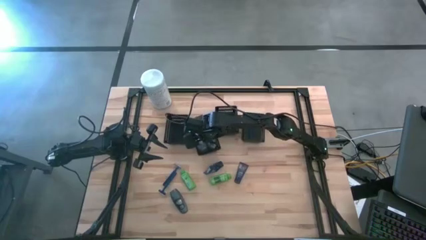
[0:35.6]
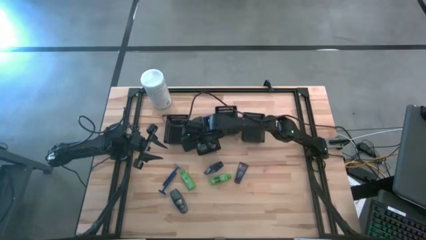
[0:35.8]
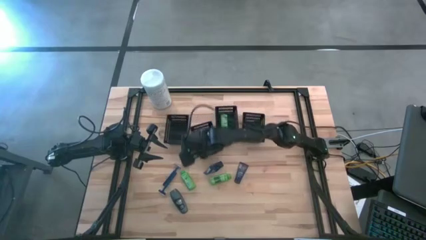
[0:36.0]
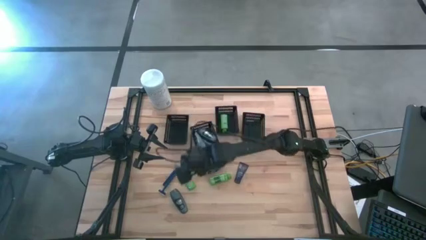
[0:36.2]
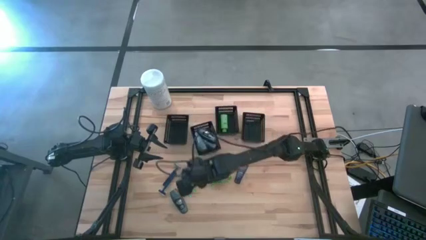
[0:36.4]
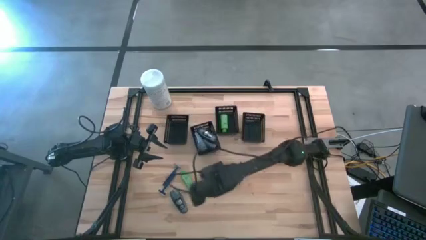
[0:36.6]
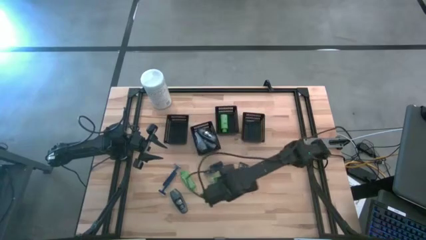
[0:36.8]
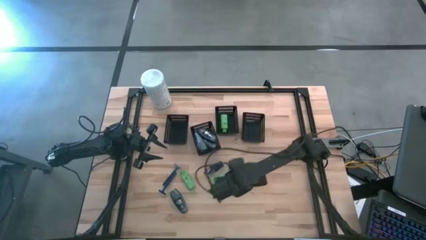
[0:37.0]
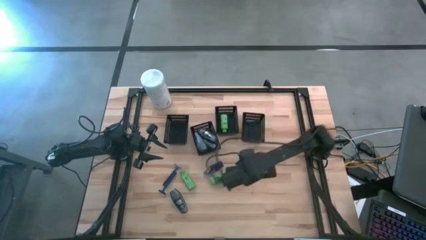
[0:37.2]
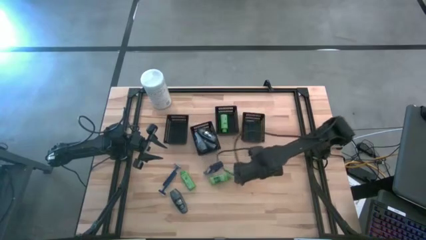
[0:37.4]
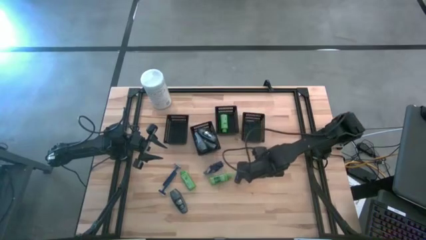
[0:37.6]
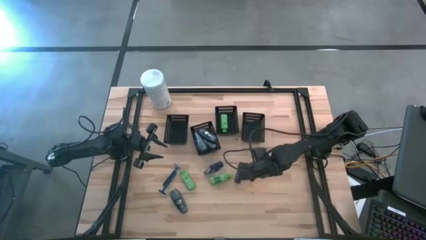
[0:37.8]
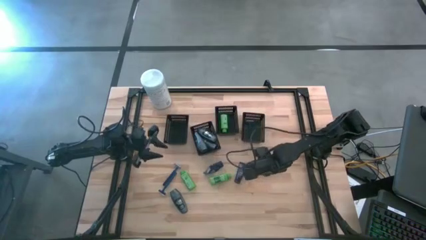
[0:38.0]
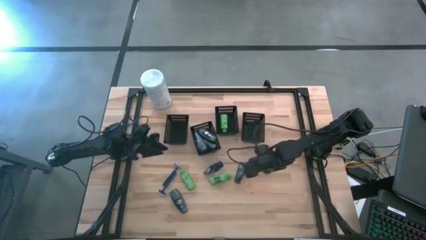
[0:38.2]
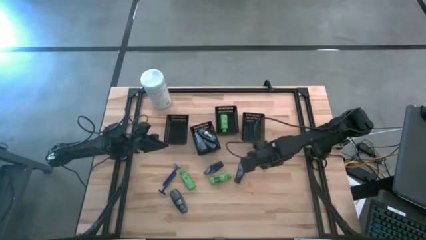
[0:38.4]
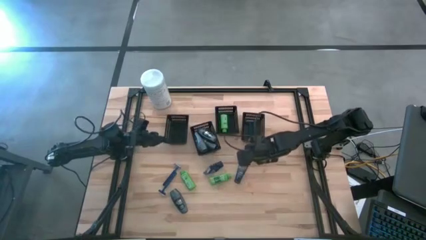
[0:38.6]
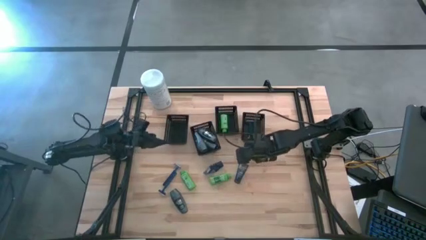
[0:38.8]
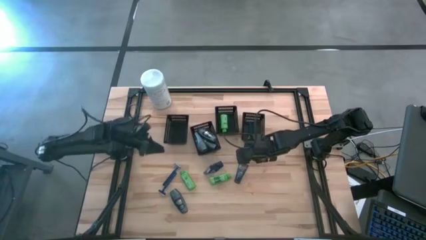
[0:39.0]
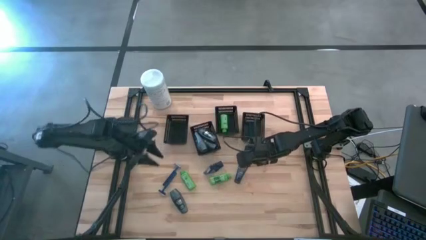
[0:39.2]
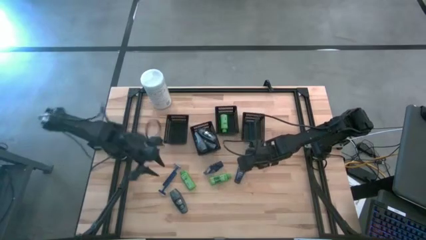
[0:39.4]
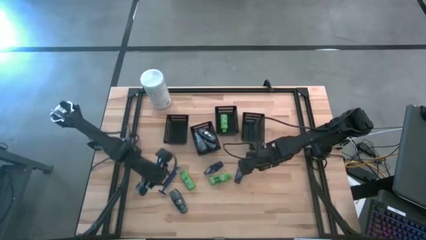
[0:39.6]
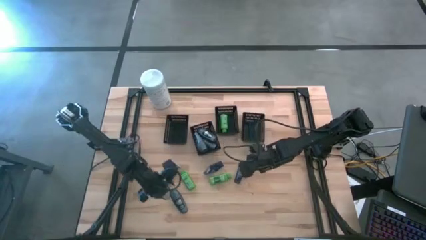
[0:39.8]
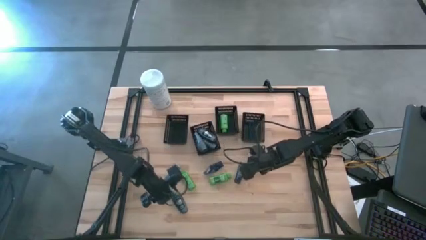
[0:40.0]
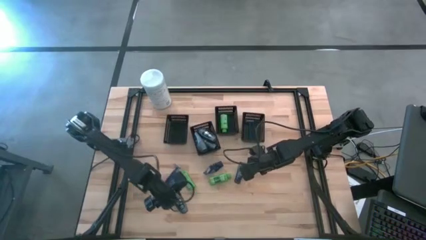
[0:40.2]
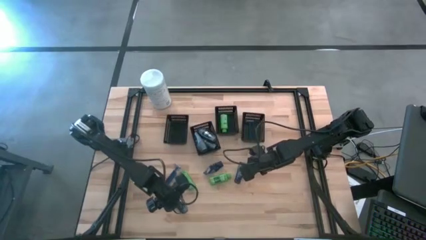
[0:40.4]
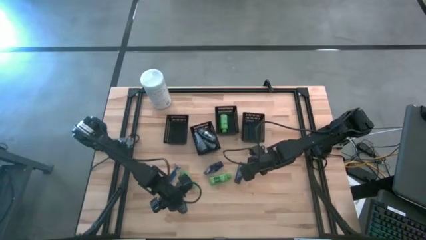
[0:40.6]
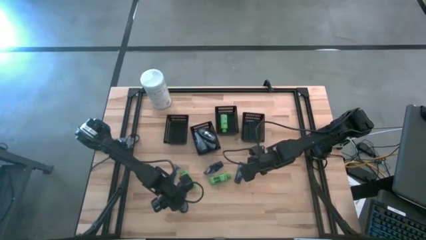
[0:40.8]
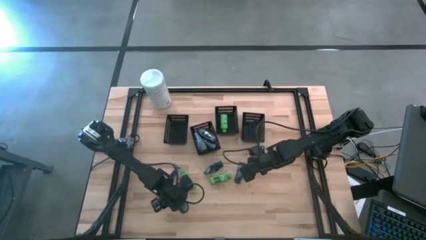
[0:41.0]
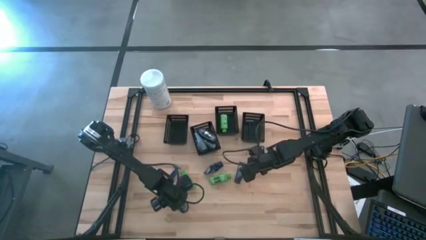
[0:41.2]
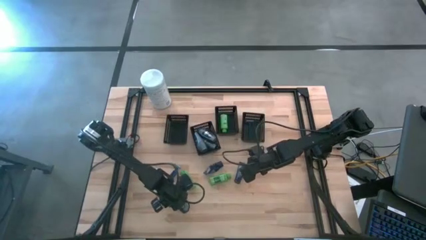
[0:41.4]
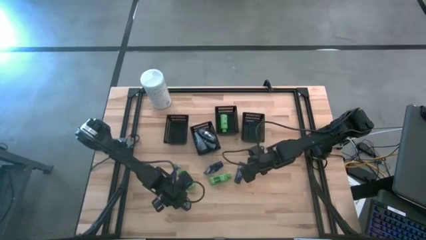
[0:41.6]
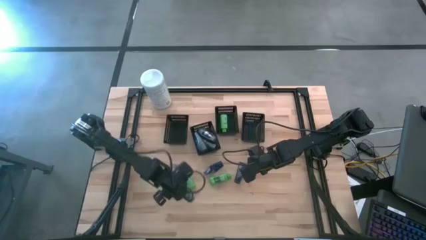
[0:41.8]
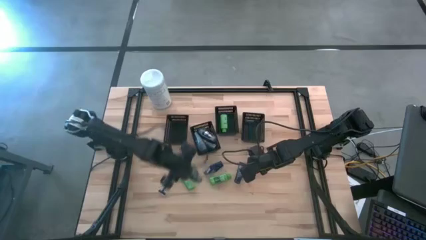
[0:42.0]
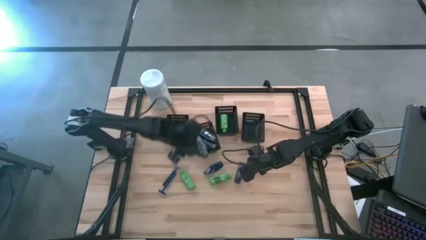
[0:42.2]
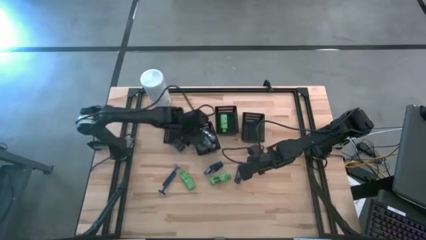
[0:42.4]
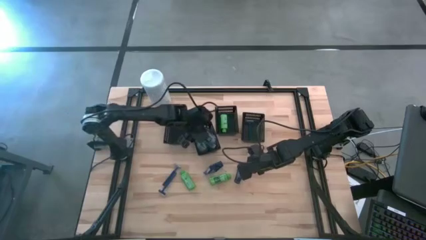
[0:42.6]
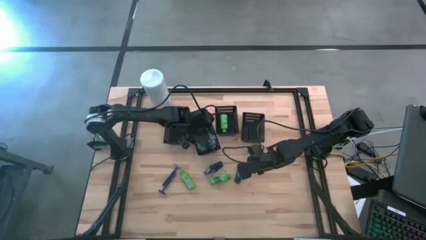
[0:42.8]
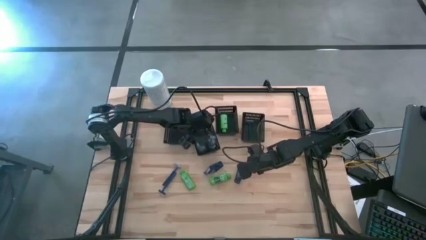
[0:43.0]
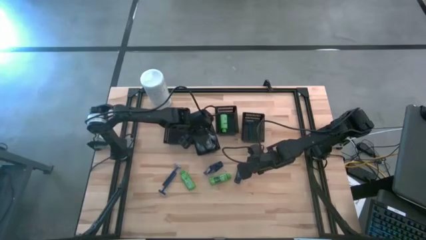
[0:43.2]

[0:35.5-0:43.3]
Task: Pick & Place Travel size toiletries
Put the deodorant into the middle left bin

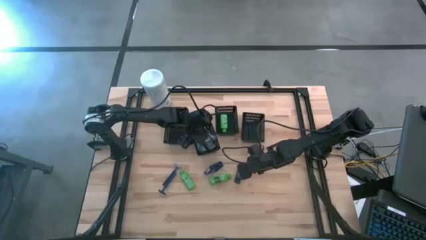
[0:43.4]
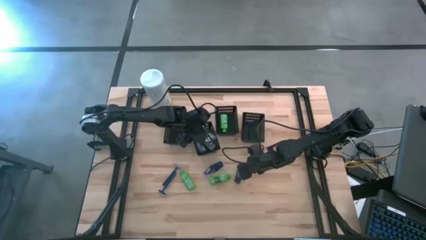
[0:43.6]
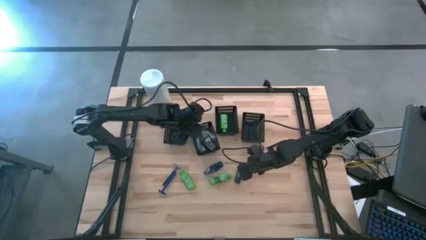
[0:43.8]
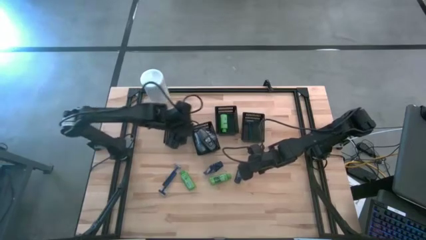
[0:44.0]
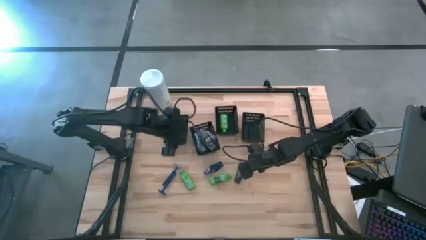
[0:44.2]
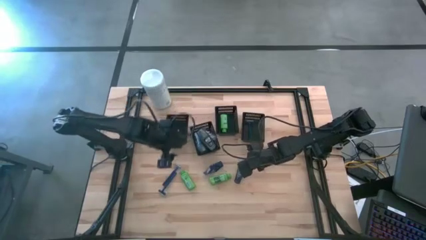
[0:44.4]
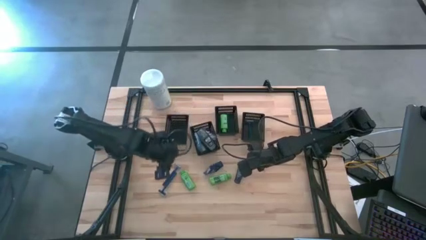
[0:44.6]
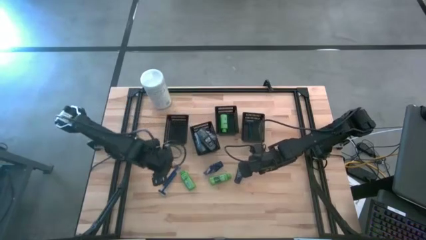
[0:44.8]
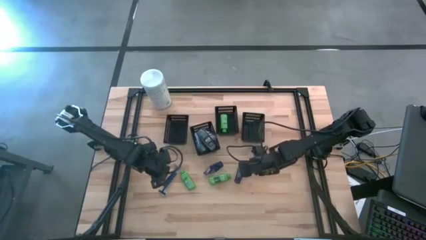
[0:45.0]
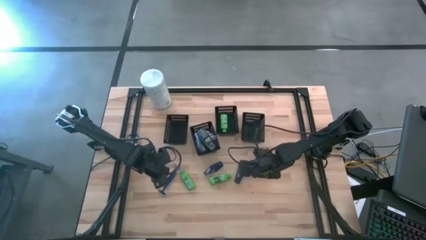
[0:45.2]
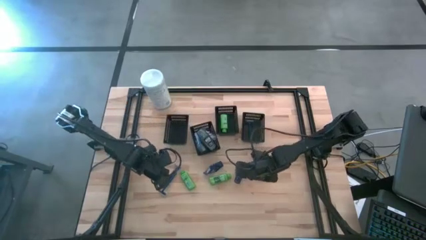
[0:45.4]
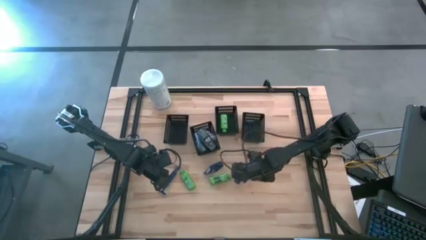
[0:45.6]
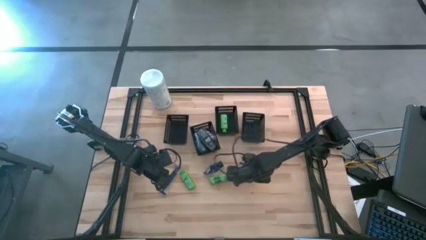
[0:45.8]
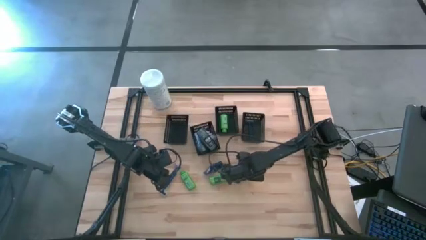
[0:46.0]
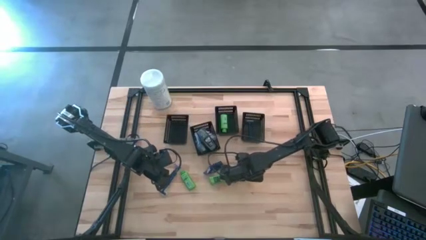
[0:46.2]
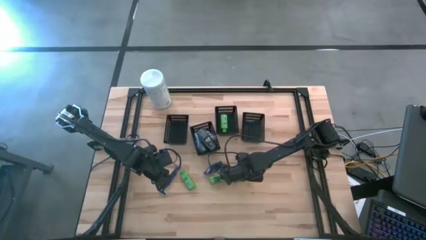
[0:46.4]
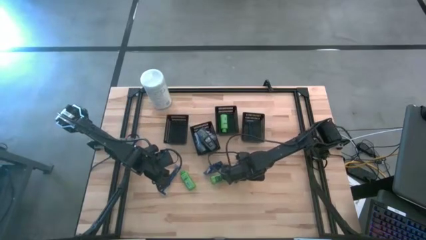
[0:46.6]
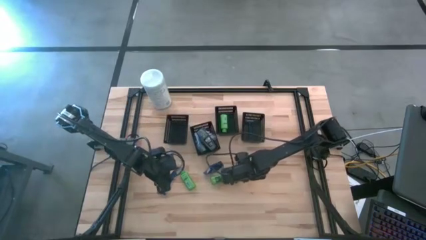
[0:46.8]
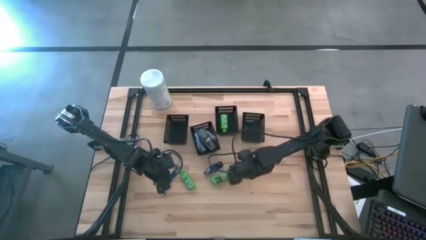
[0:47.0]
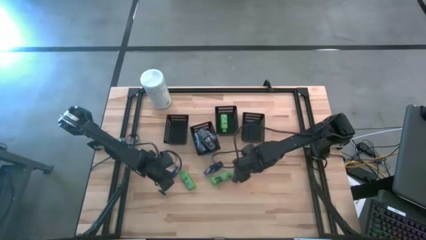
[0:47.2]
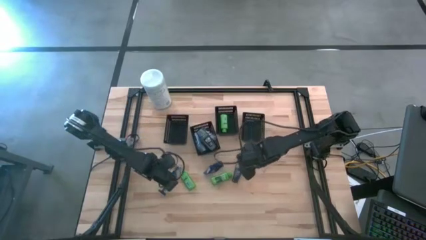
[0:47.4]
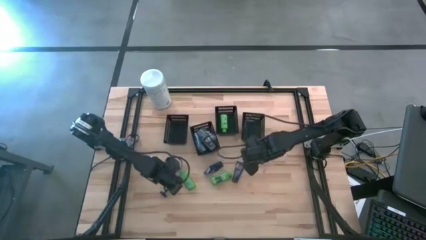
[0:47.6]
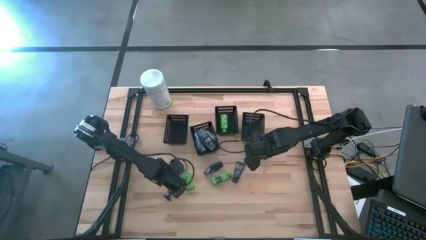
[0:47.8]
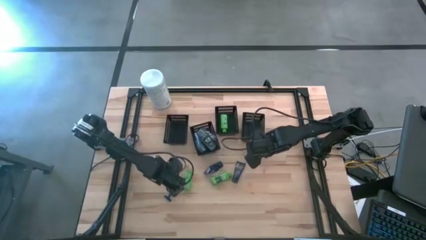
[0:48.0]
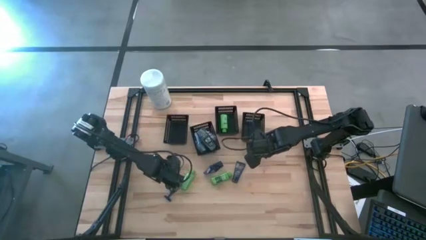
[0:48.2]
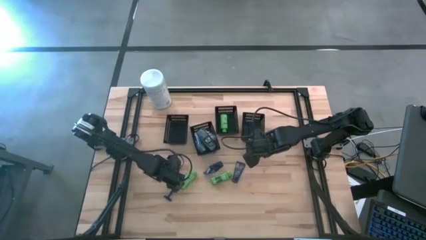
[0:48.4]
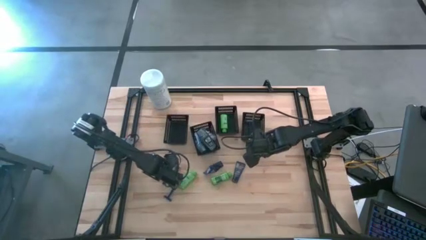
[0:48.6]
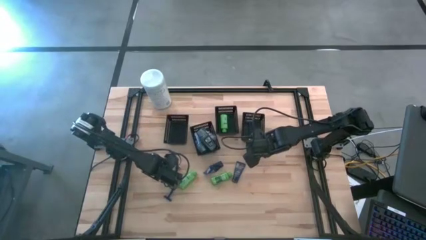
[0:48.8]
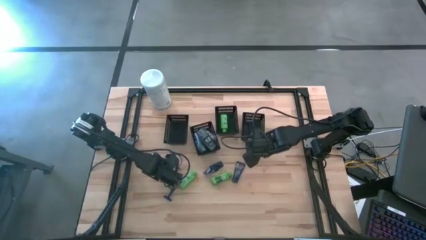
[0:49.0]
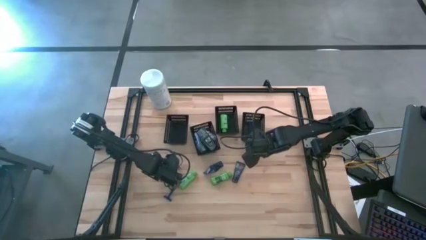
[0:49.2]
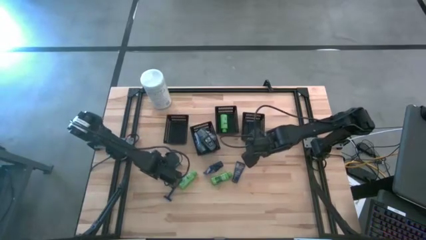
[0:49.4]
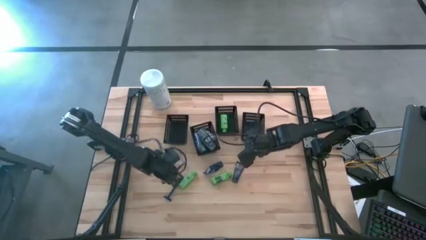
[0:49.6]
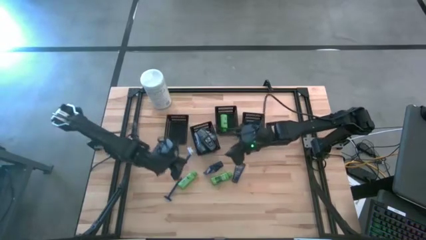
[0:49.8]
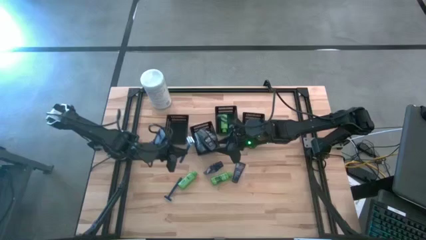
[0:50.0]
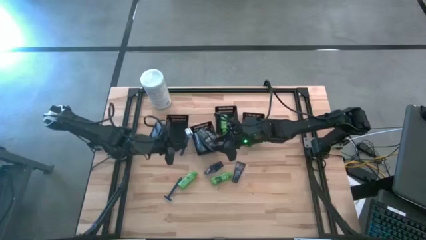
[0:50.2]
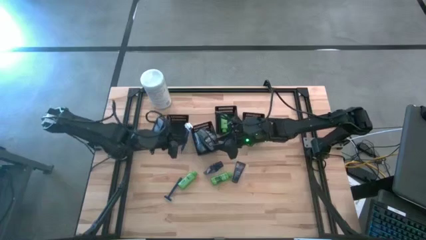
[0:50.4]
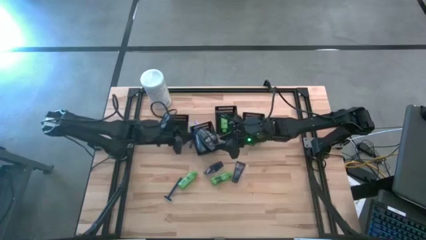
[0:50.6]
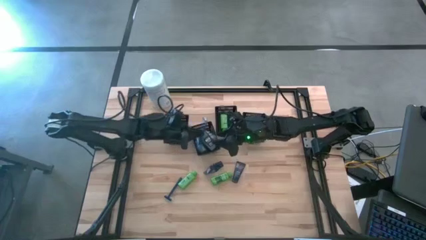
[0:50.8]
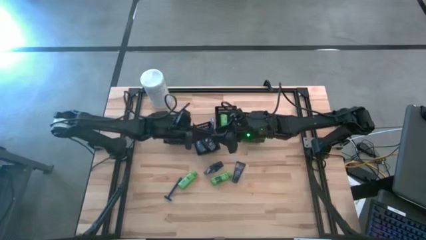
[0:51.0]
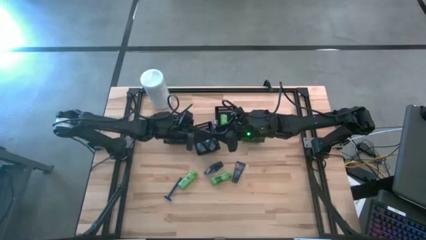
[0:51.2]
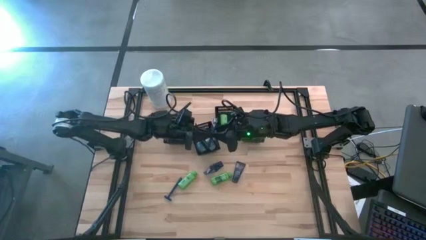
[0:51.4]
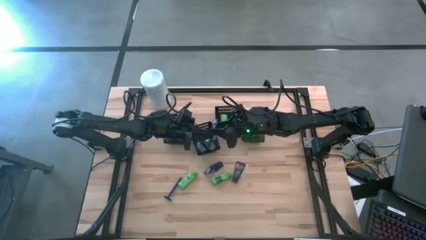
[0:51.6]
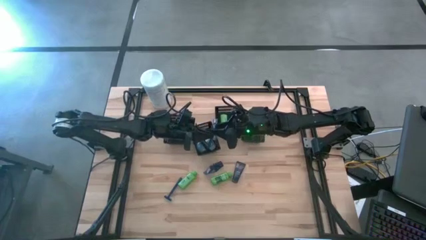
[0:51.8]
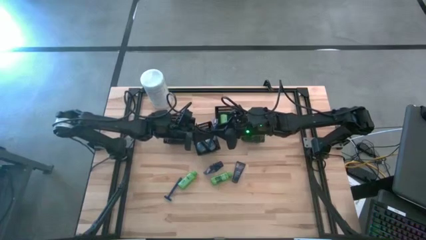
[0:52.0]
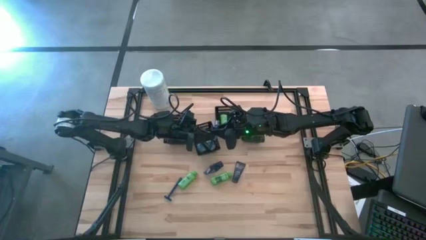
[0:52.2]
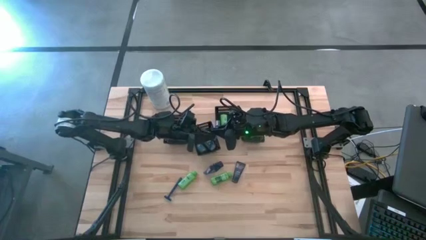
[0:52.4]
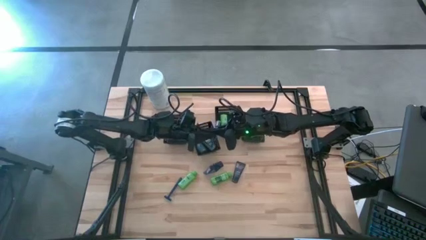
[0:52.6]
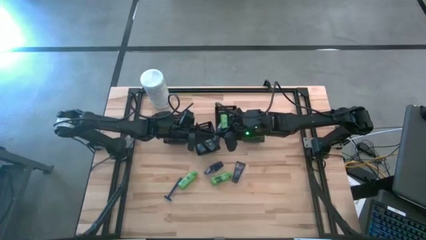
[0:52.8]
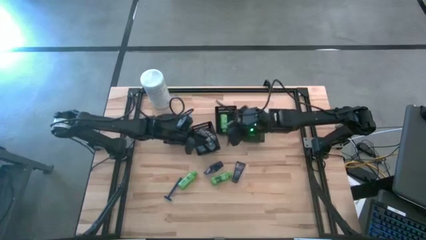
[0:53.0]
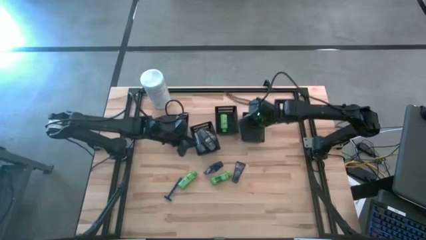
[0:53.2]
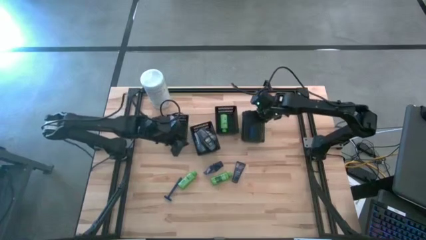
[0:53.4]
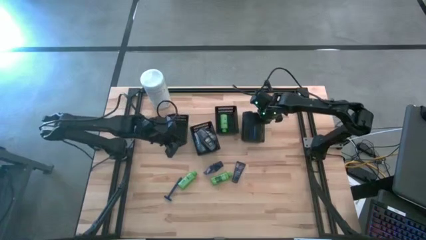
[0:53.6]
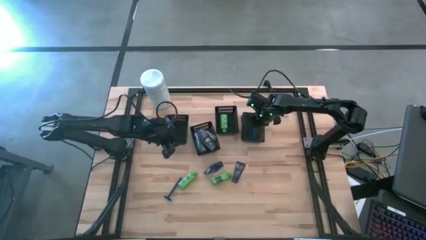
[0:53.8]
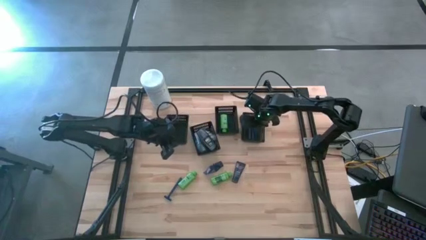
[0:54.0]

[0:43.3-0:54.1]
Put the left razor into the right bin
